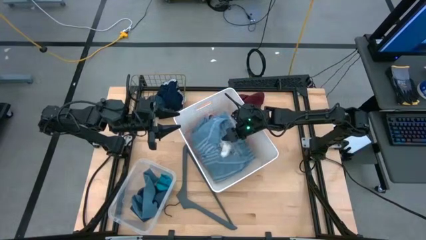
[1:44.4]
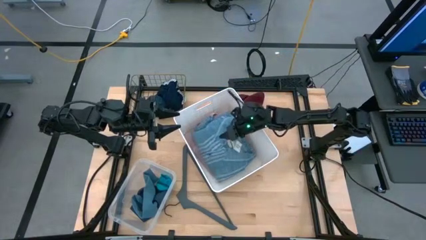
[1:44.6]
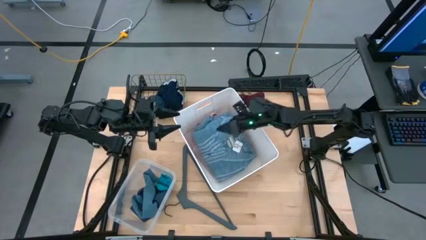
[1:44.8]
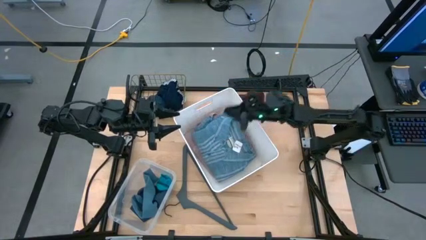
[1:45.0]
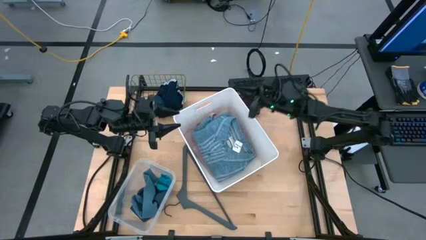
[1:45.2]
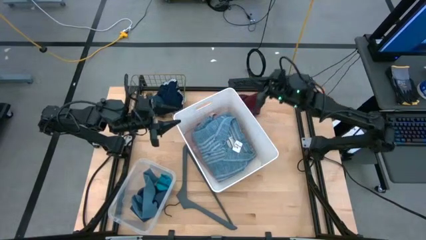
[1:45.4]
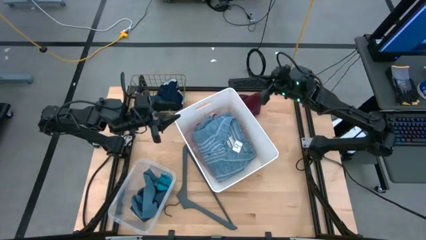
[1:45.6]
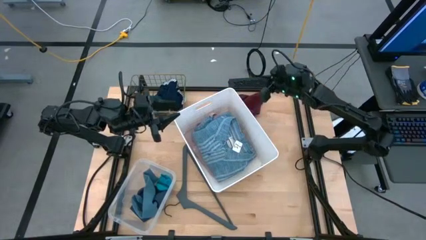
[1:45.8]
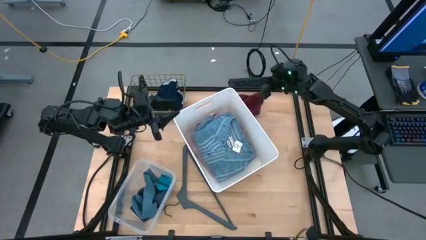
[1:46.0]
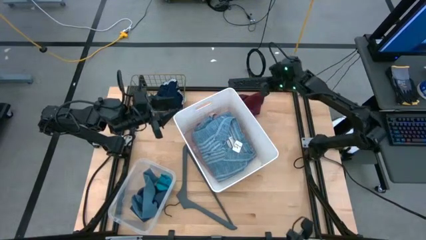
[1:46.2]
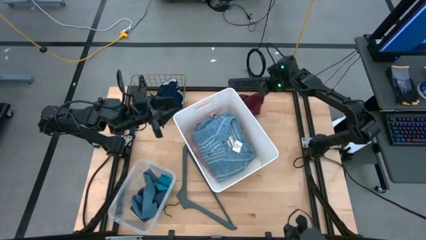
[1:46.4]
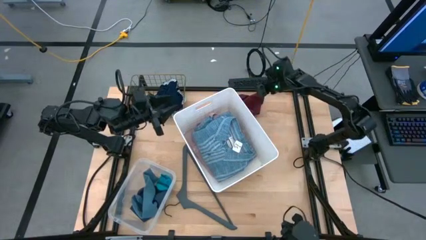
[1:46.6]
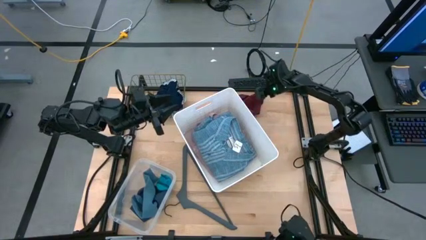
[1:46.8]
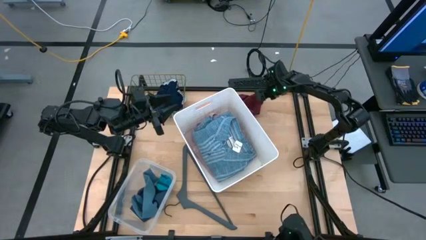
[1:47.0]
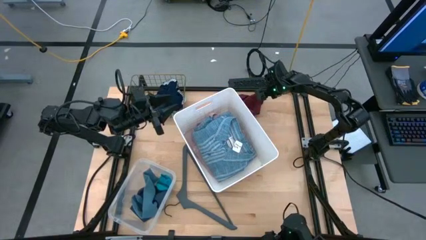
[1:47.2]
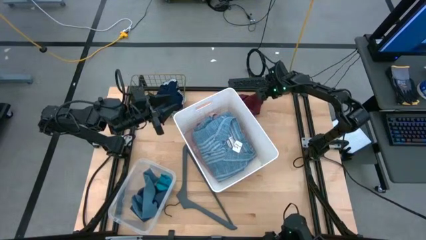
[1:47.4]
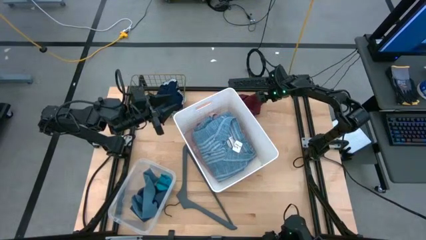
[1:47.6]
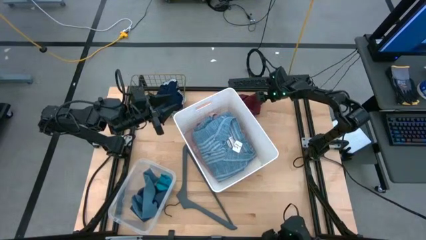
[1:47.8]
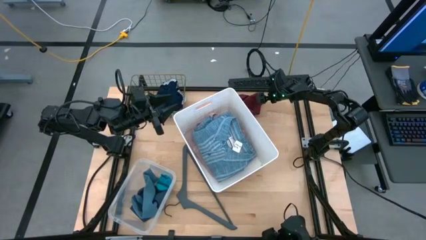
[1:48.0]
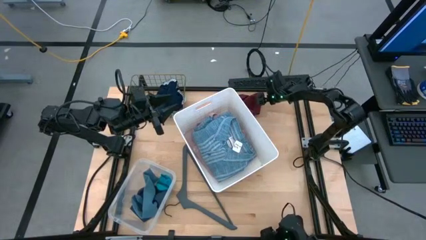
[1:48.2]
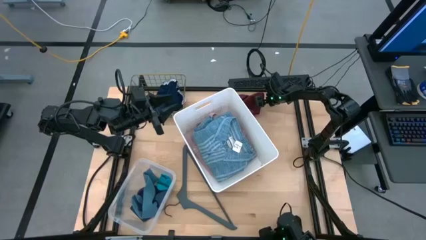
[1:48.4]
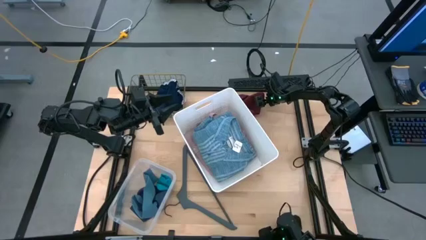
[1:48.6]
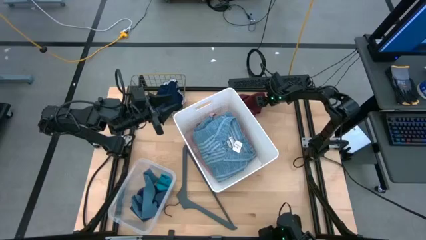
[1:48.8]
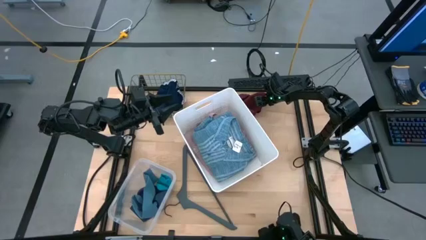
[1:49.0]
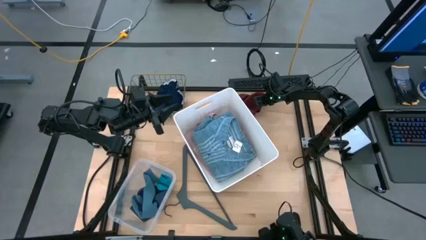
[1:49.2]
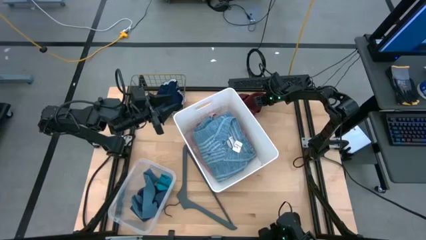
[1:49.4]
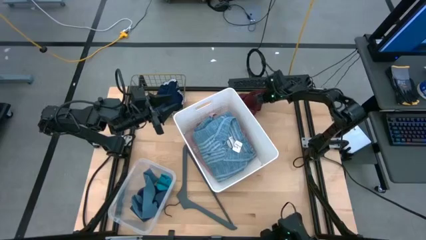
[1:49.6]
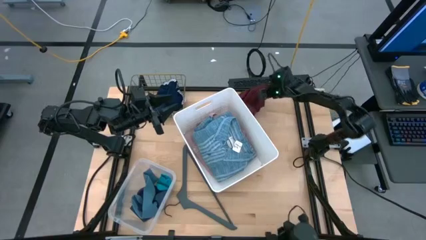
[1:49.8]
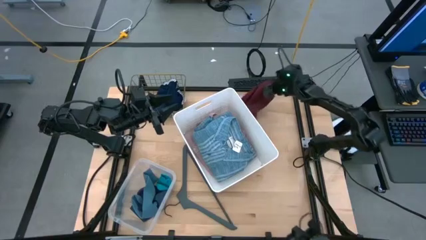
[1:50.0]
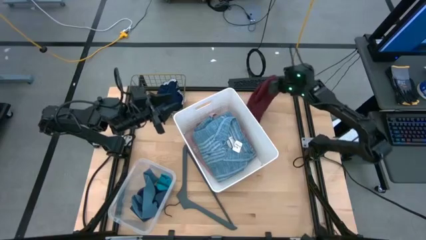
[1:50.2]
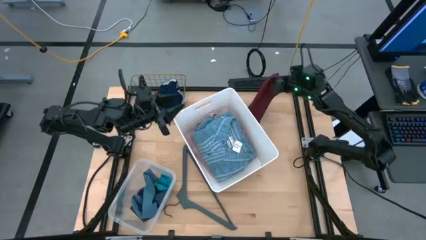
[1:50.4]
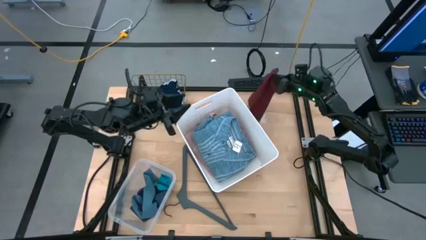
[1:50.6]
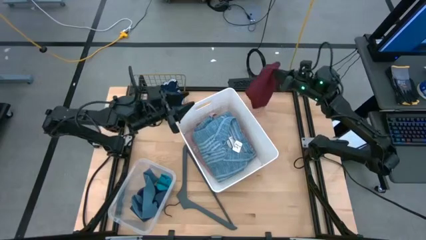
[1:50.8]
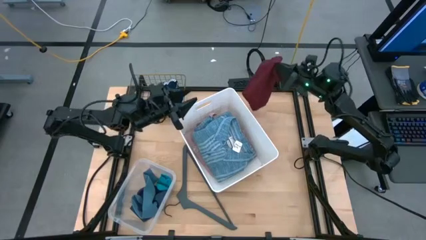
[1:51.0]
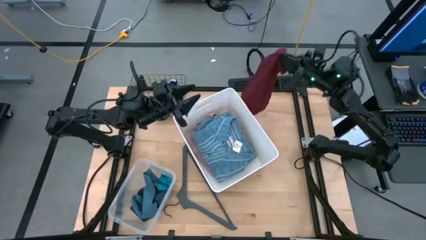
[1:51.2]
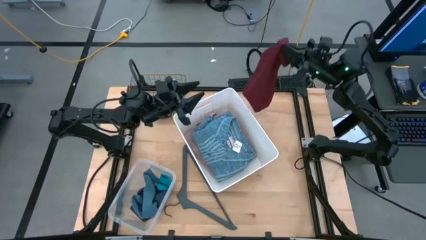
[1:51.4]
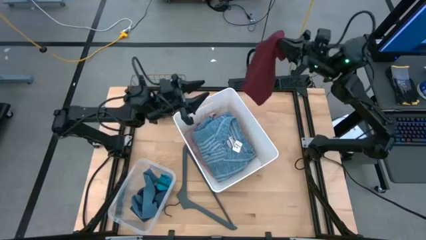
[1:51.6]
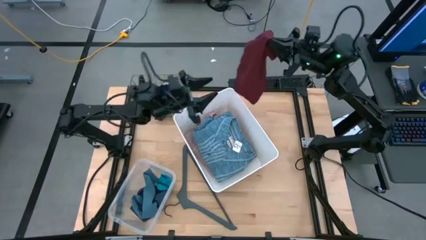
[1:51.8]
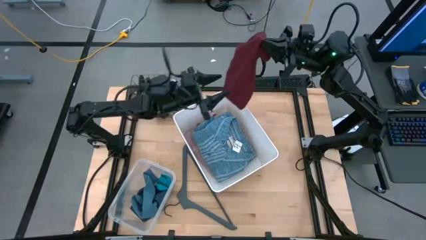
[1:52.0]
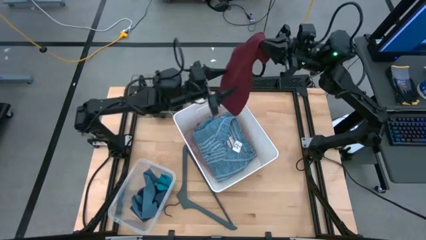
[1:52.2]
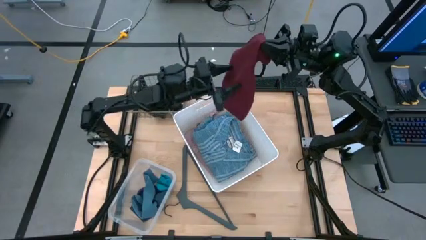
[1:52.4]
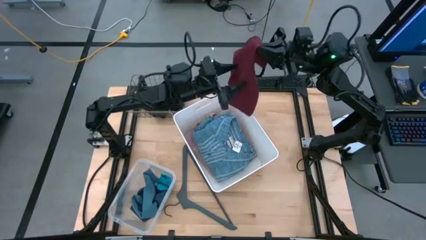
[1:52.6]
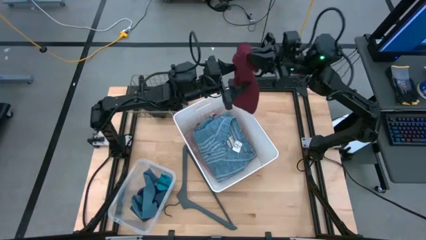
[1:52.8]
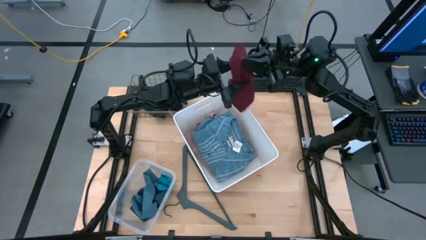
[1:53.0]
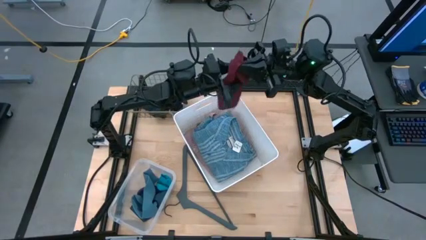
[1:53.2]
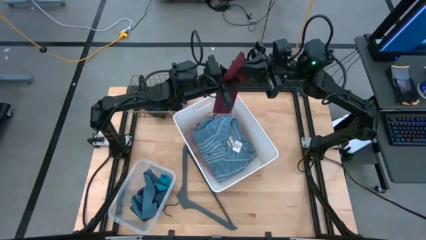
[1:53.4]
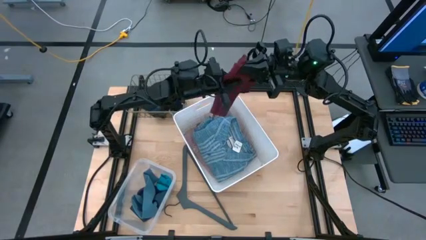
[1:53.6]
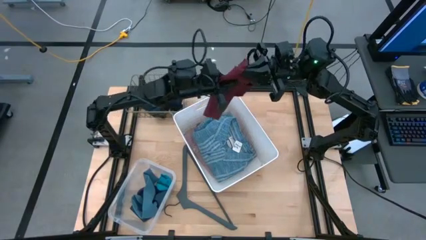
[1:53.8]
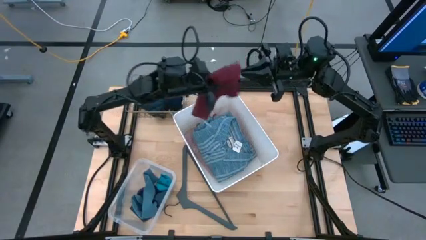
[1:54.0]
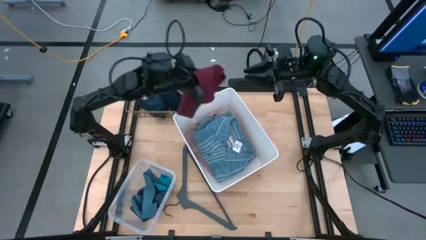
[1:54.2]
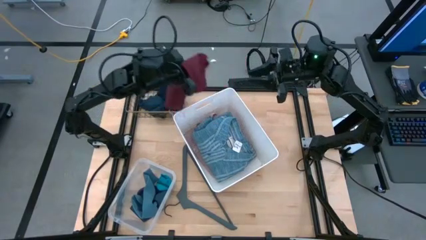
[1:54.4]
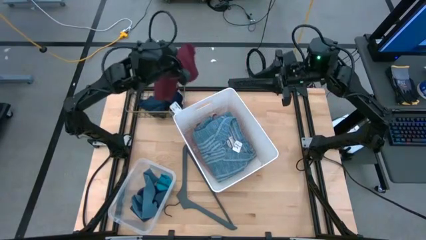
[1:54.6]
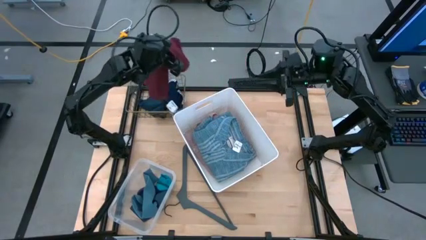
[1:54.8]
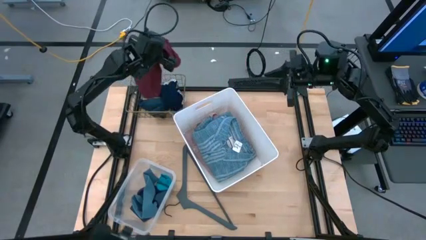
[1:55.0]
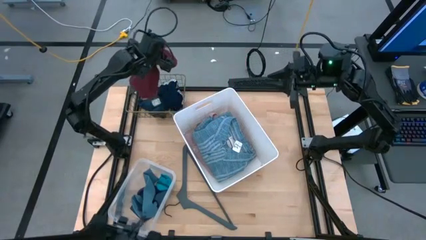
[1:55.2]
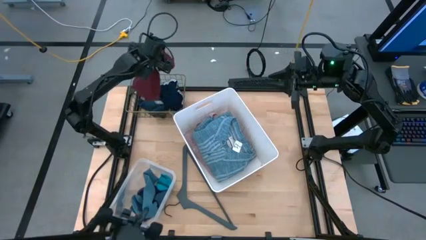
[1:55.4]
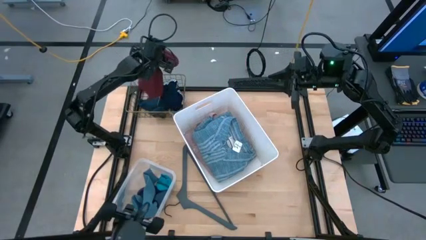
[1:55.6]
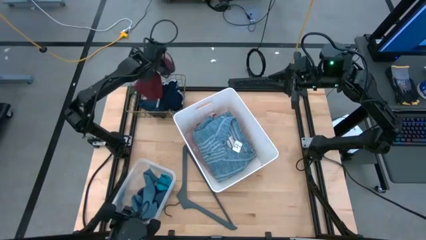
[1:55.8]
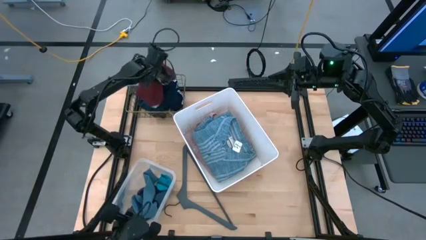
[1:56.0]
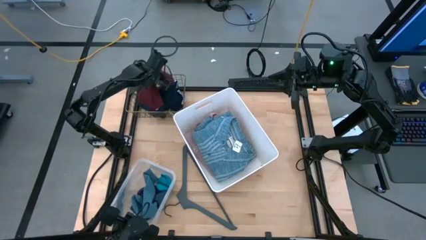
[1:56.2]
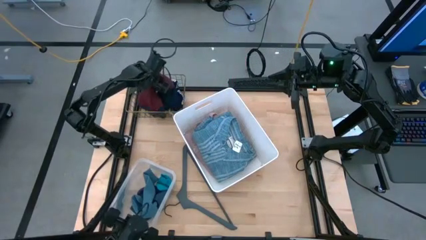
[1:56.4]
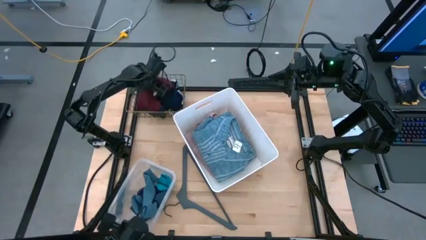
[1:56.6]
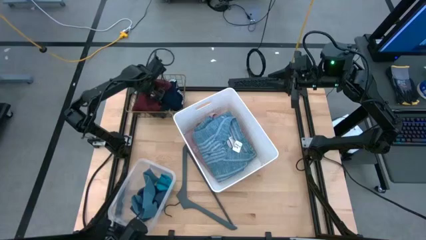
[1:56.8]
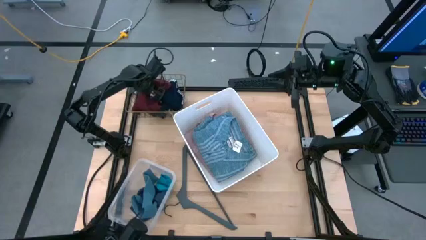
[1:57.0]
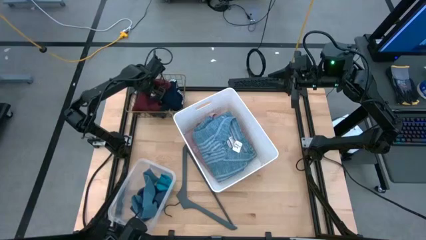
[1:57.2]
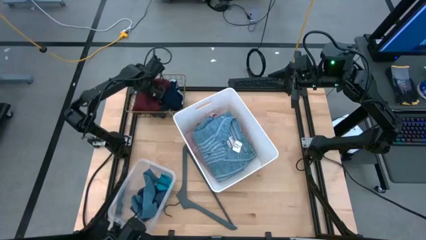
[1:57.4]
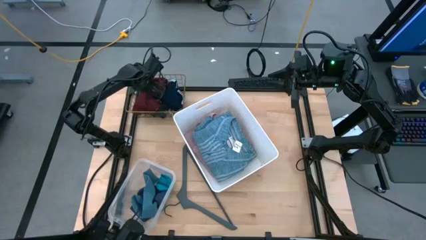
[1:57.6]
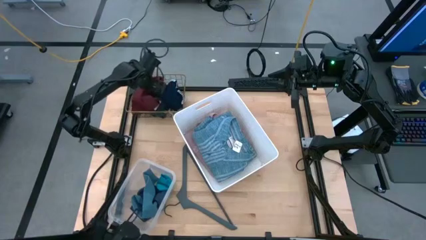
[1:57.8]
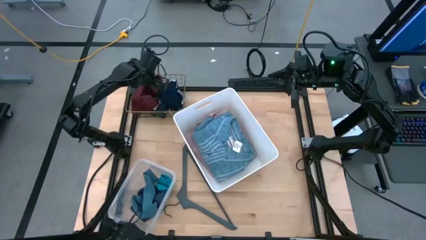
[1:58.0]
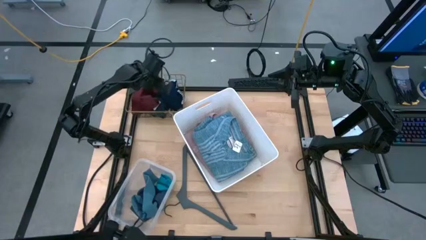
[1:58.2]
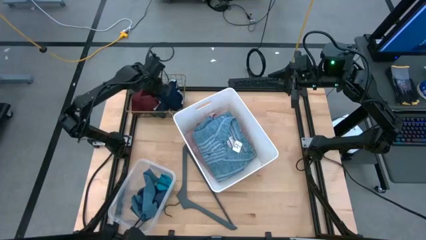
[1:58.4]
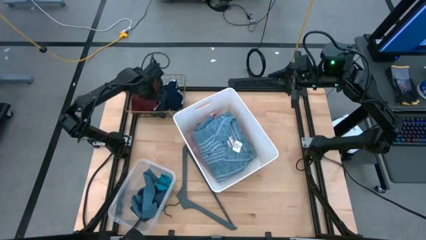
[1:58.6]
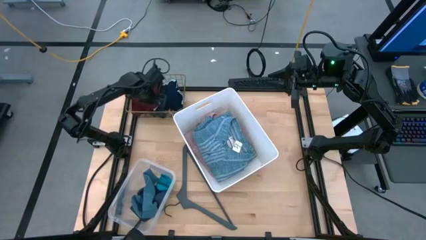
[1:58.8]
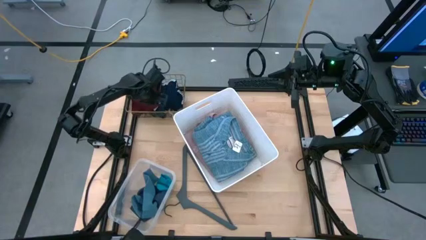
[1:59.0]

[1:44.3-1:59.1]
Task: Pick & Place Cloths
Put the red boxers into the wire basket
